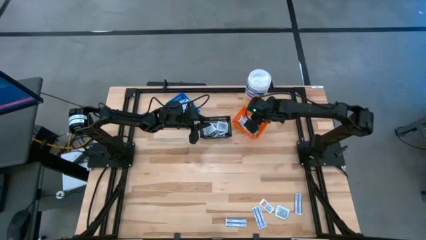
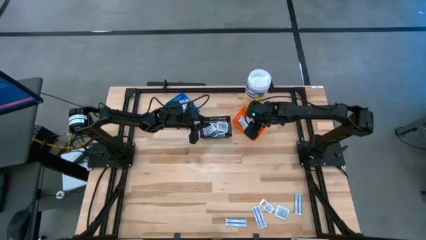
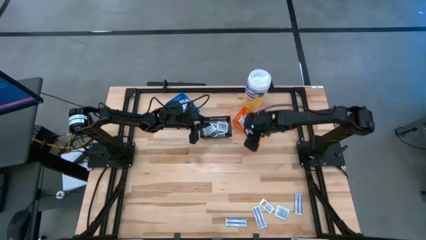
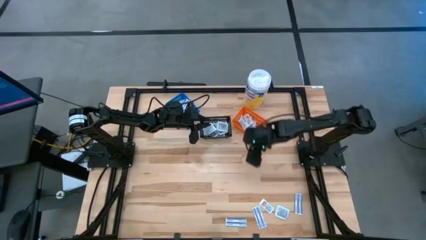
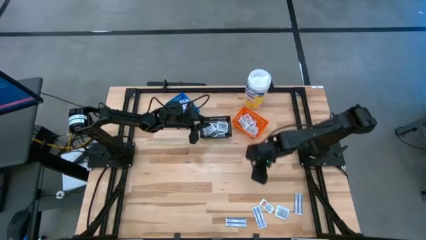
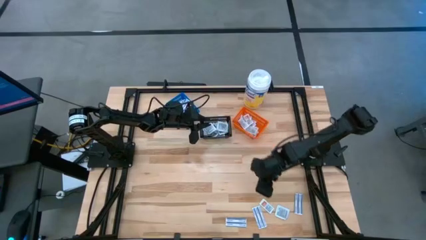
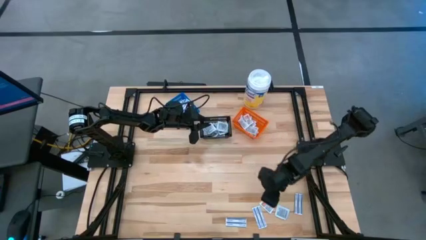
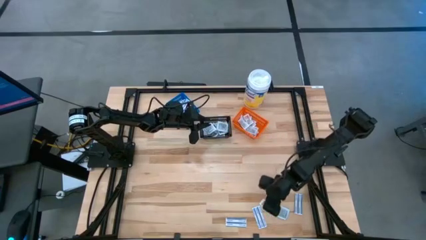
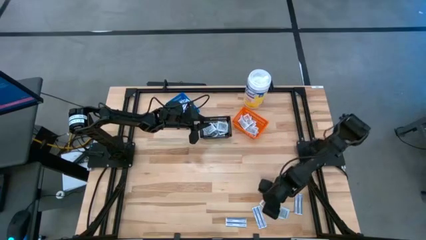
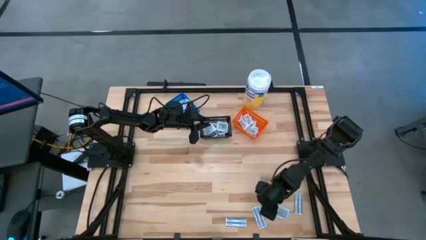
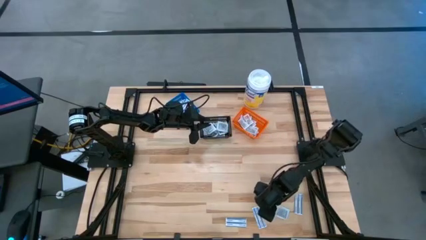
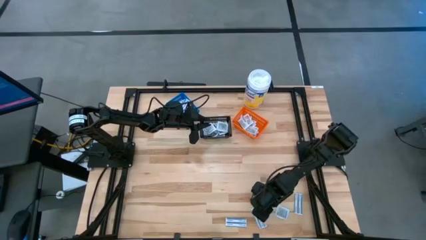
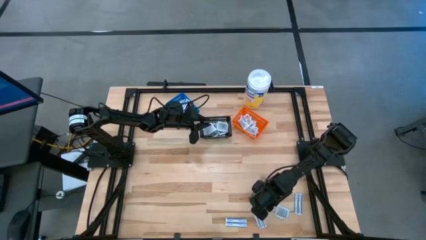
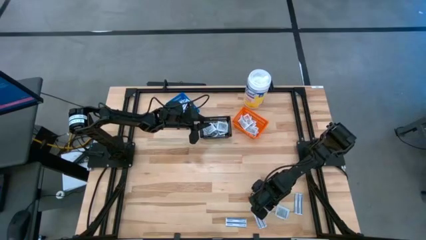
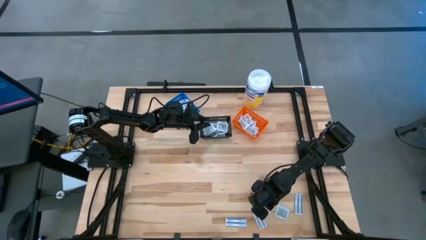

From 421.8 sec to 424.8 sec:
Task: Pick & Place First Aid Supplies
Put the ointment into the orange container

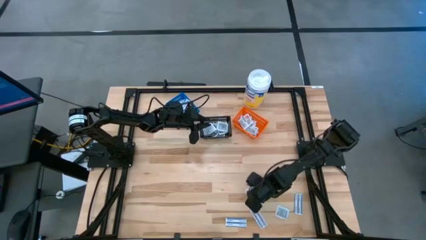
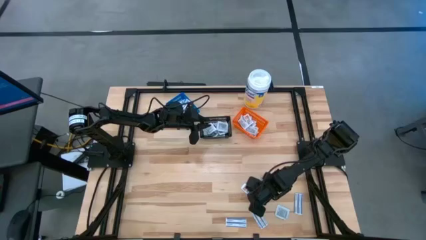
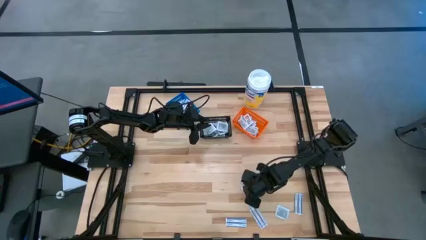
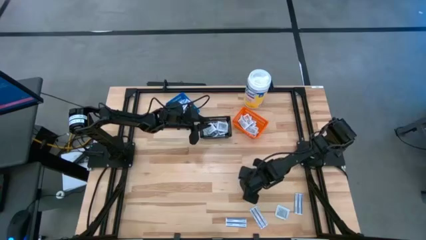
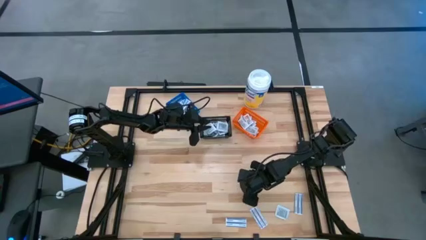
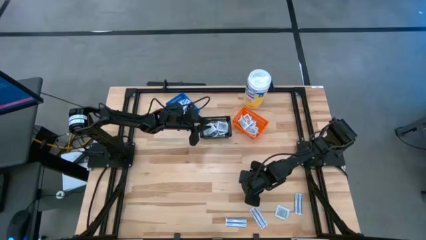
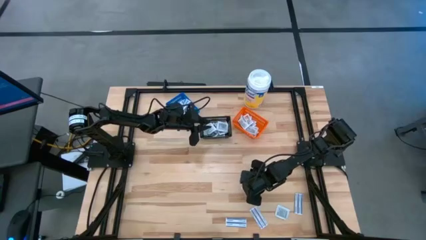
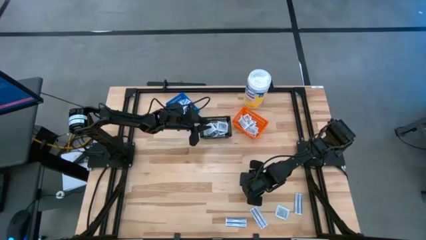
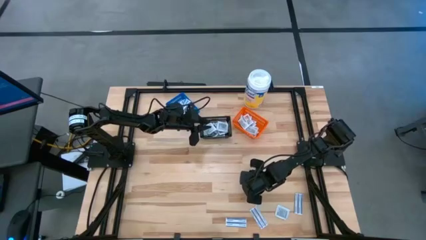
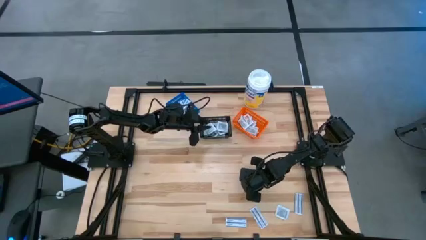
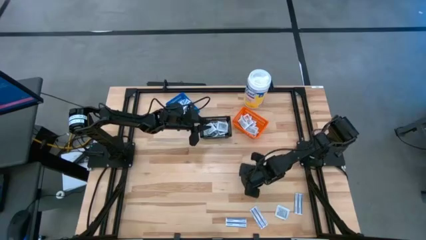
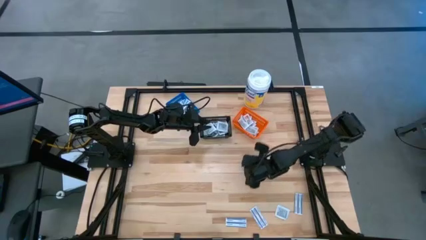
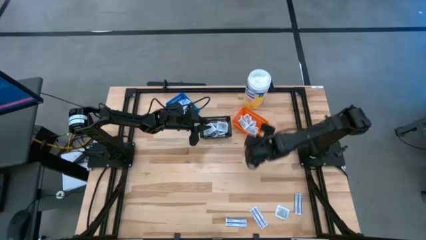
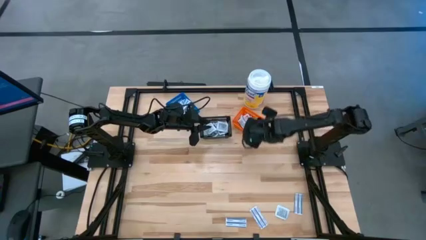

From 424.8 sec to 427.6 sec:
Put the ointment into the orange container

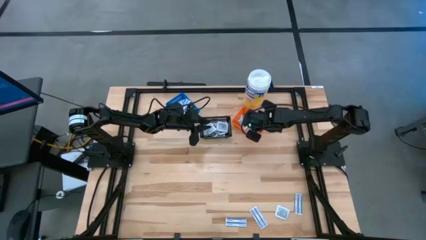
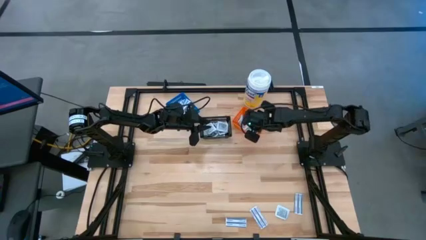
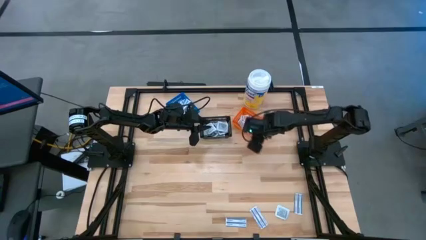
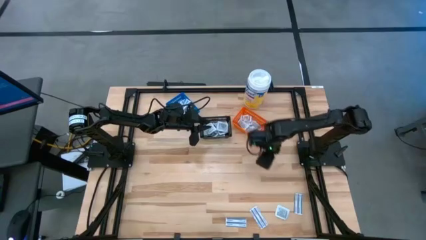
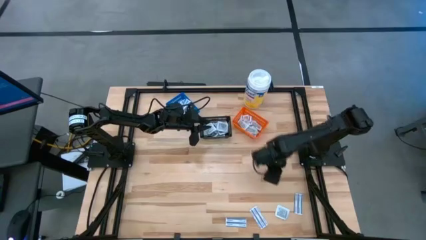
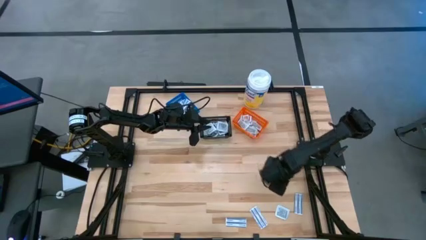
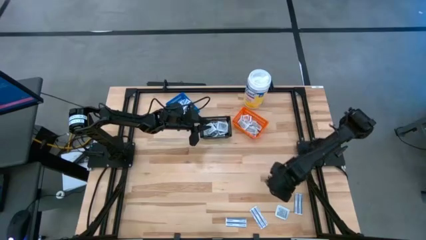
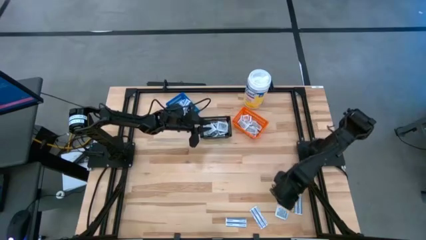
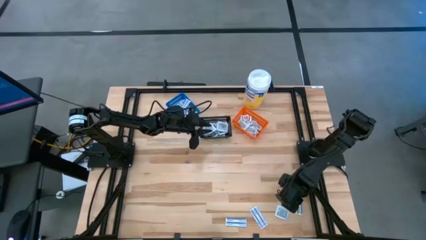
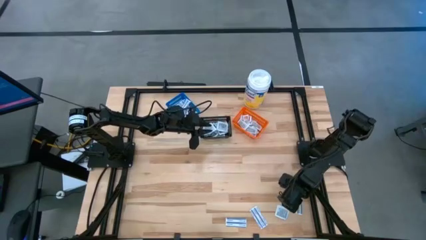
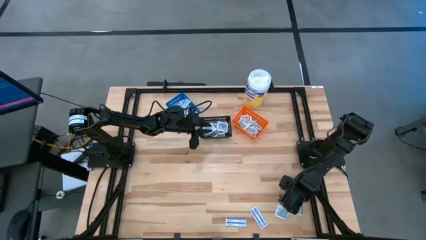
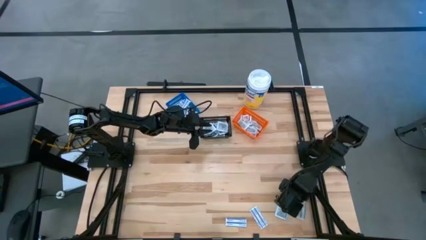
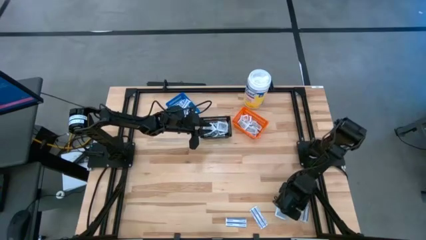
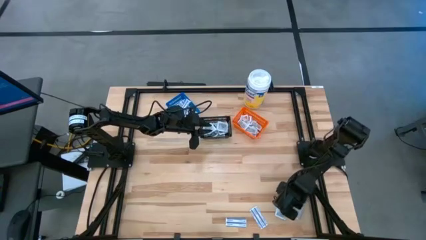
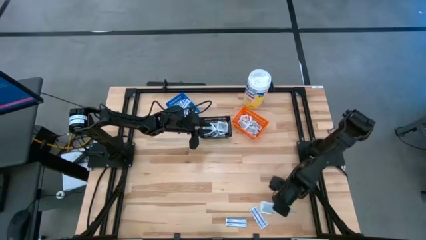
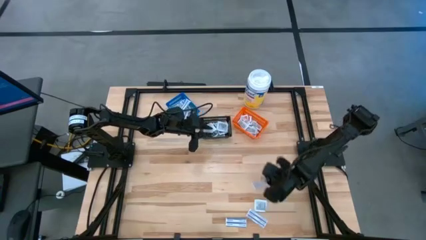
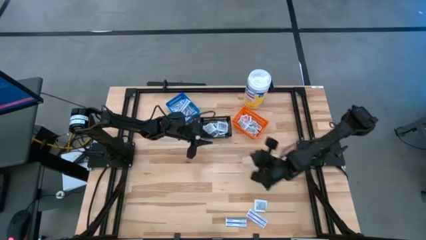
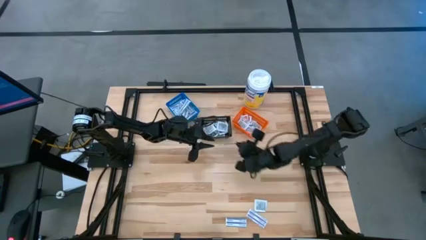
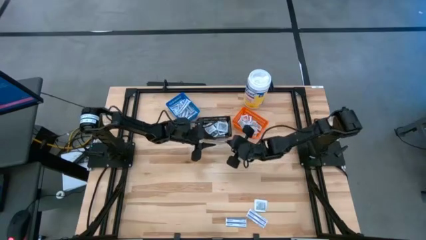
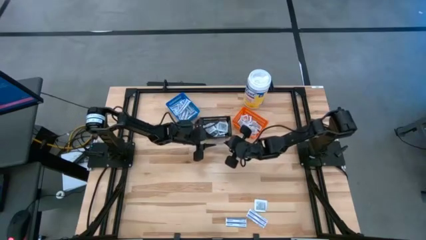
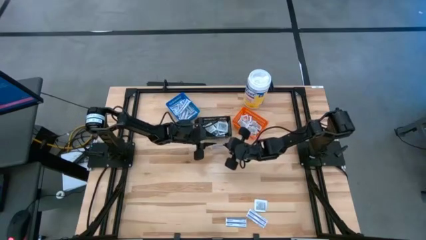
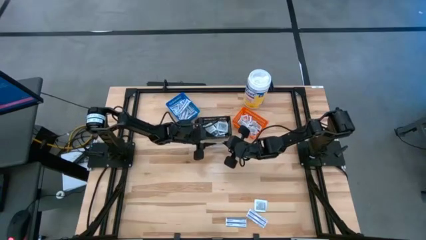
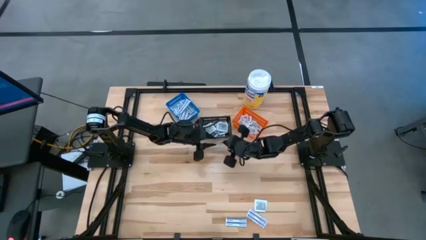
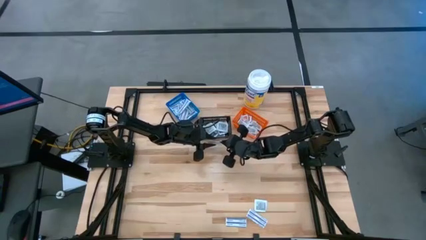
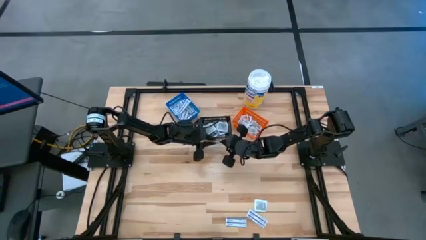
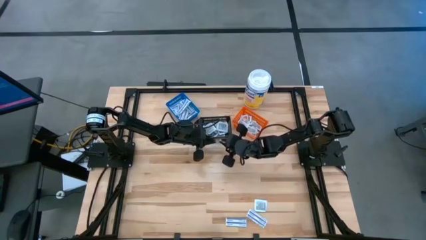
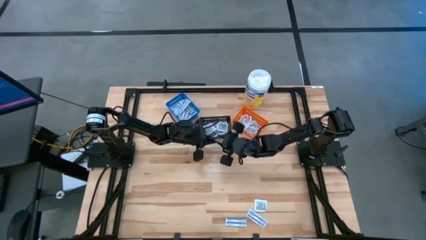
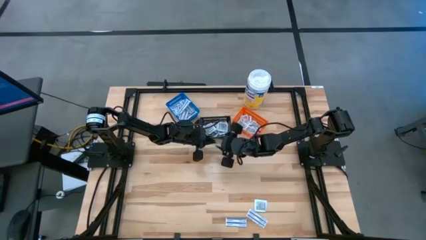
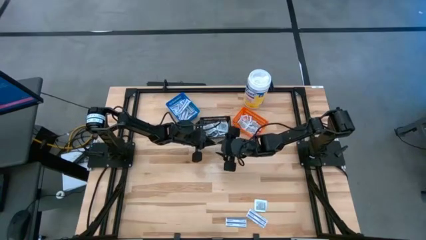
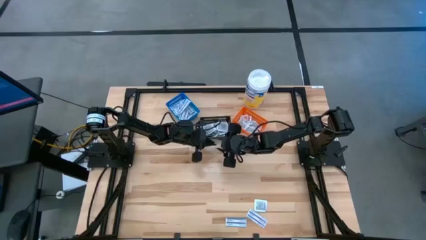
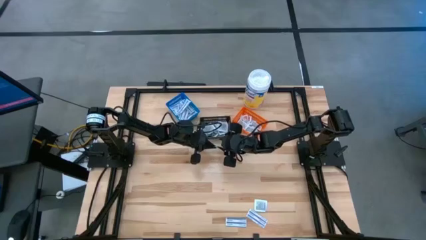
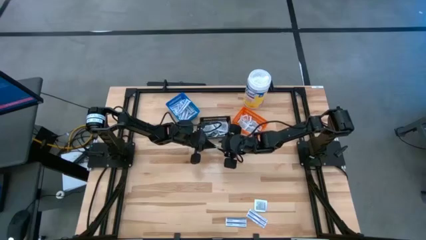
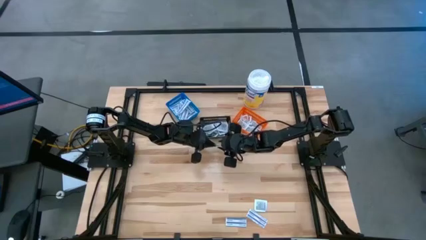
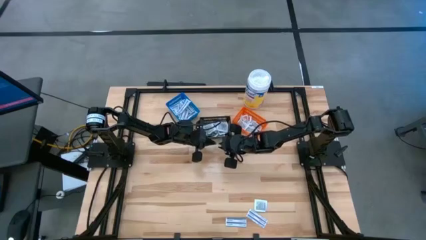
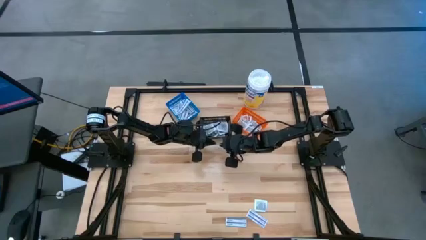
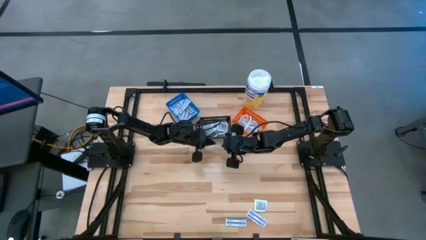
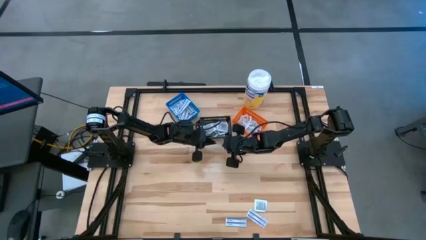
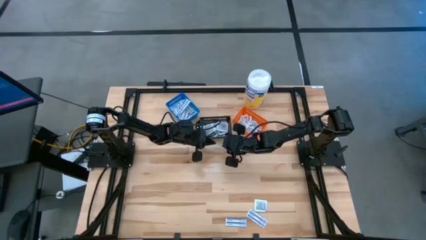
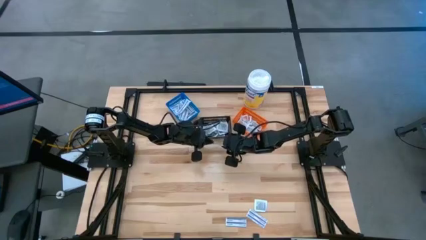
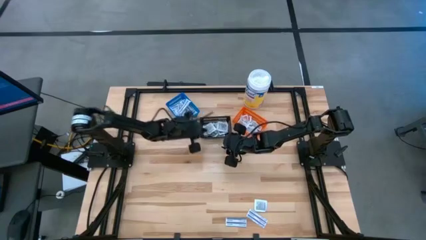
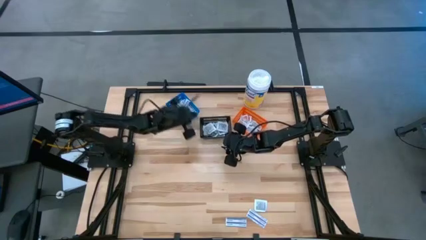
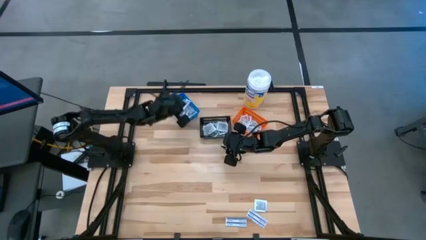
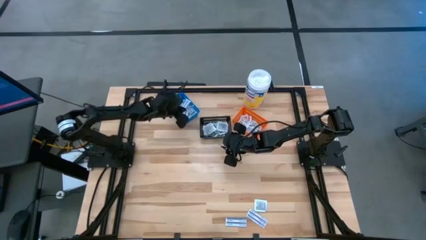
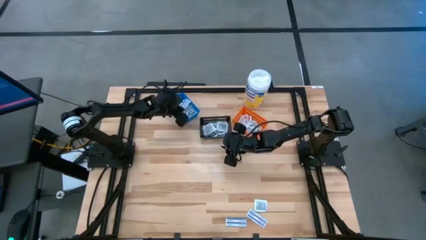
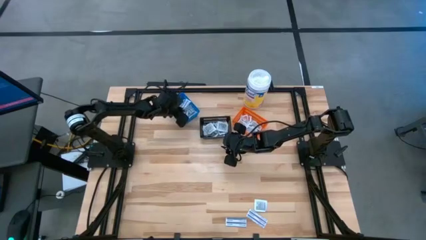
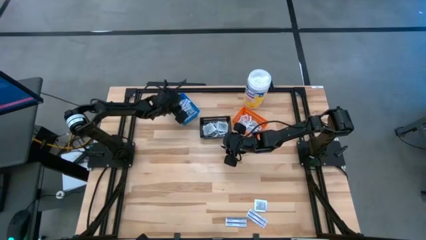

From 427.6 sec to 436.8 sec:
Put the bandage into the blue container

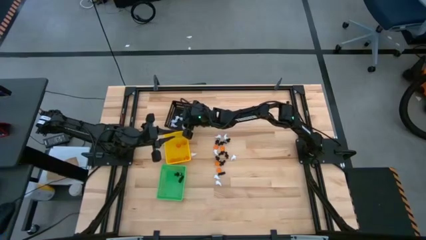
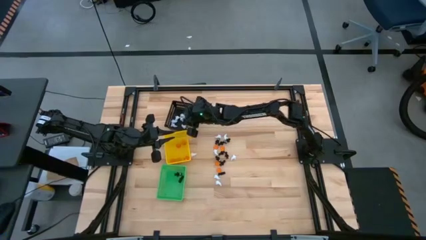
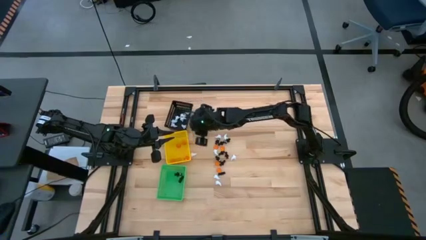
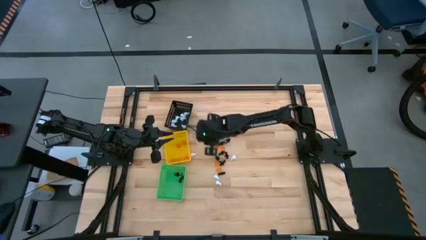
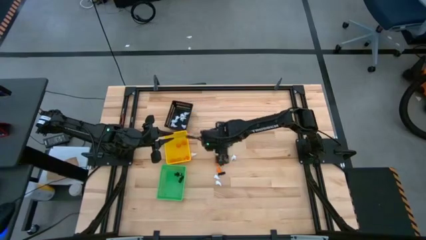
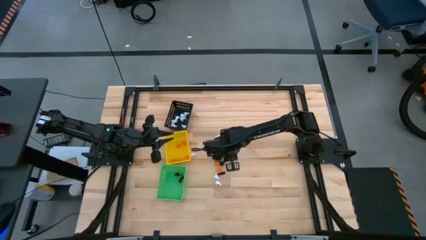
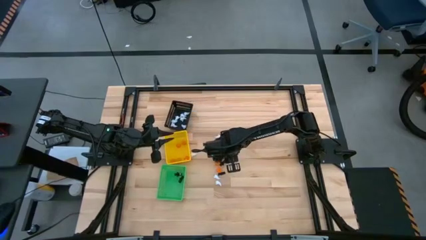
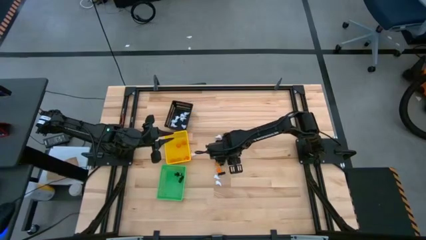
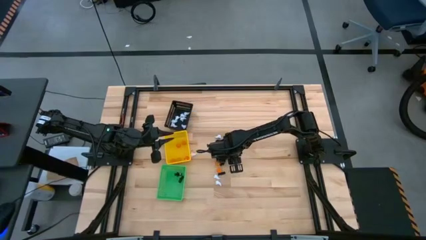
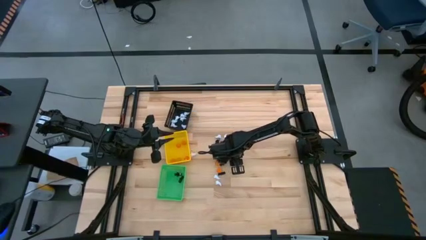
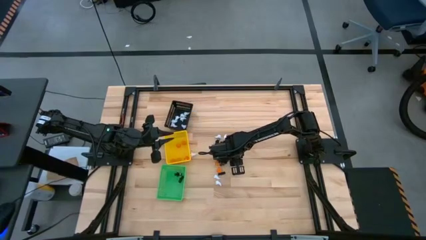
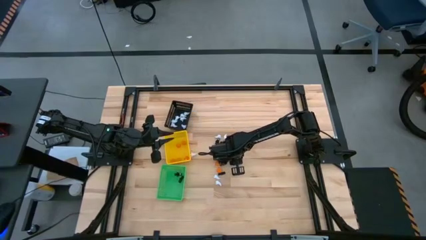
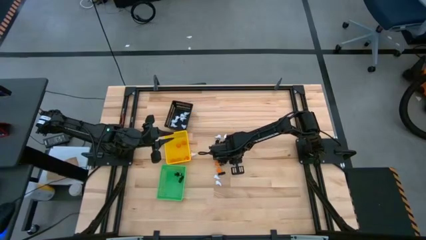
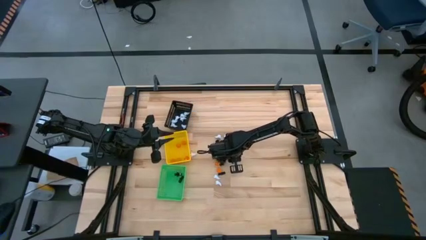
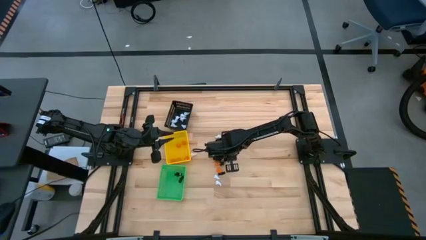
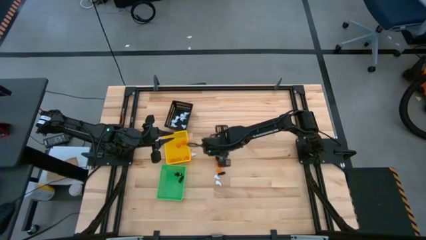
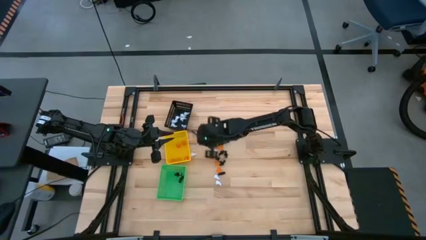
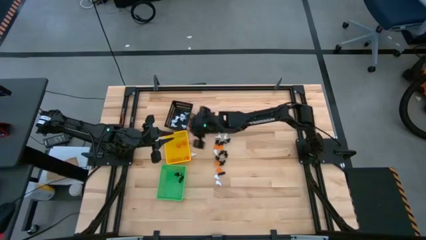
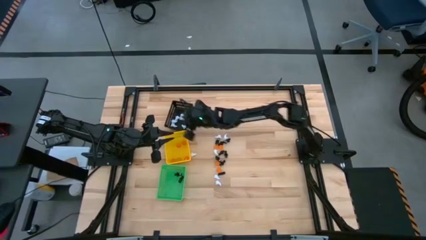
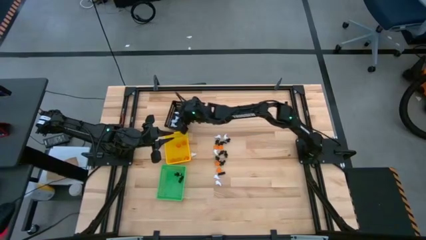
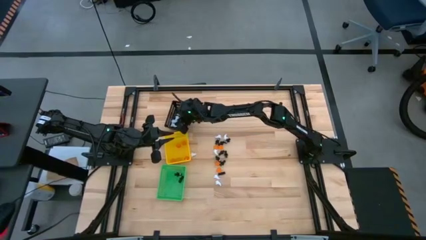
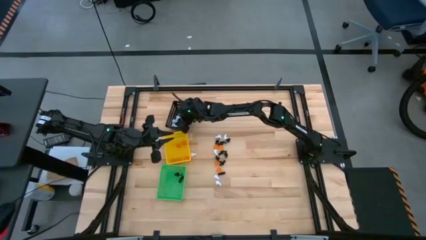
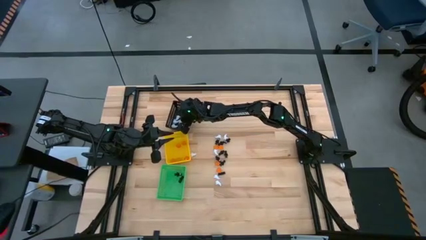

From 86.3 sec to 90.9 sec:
Task: Sort Halloween decoration
Put the white ghost plush toy into the black basket
